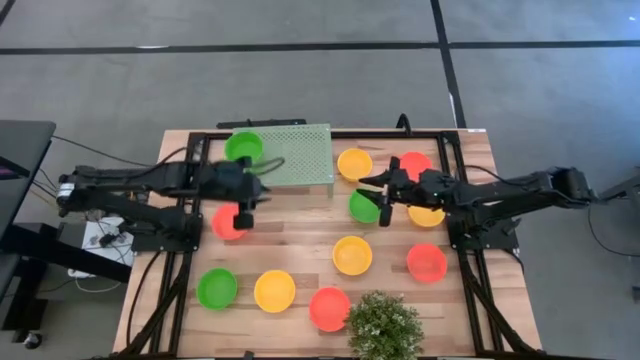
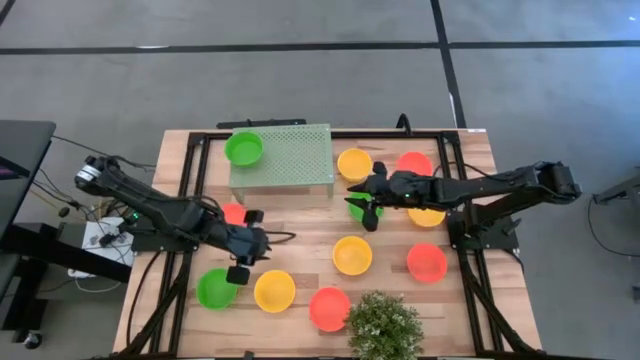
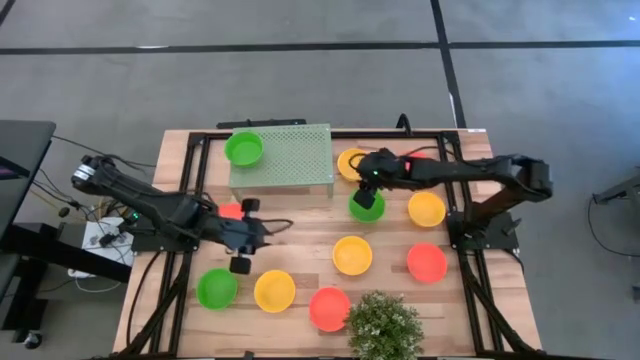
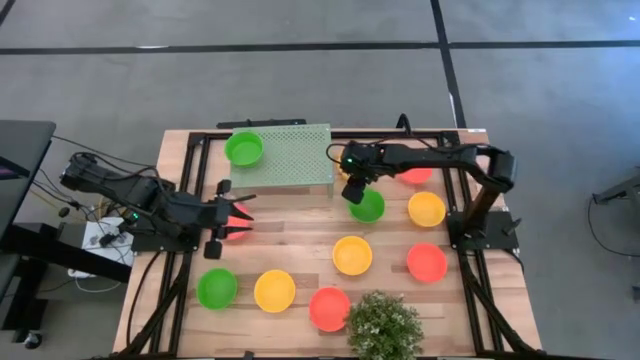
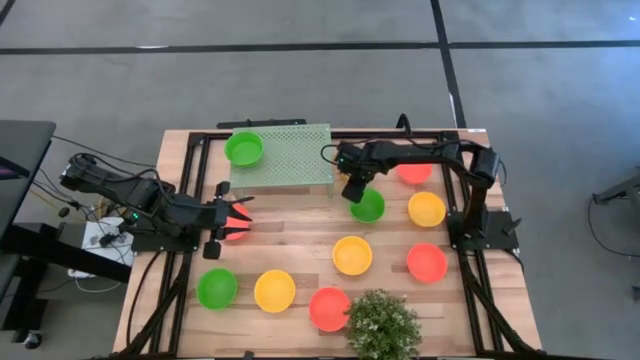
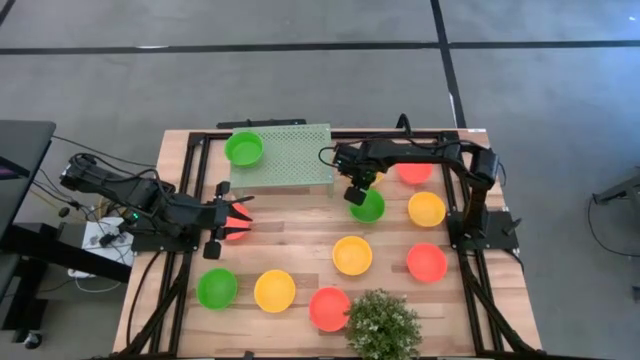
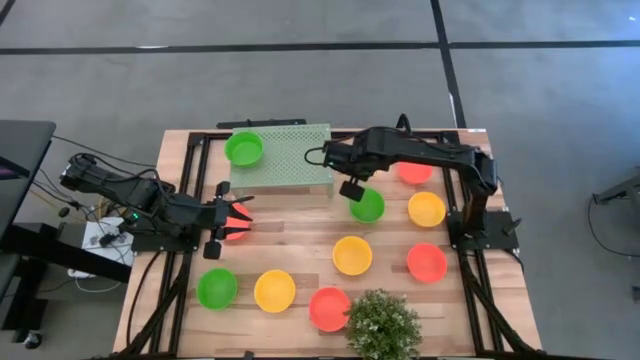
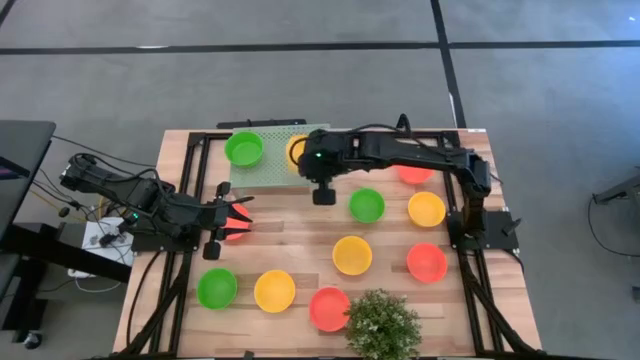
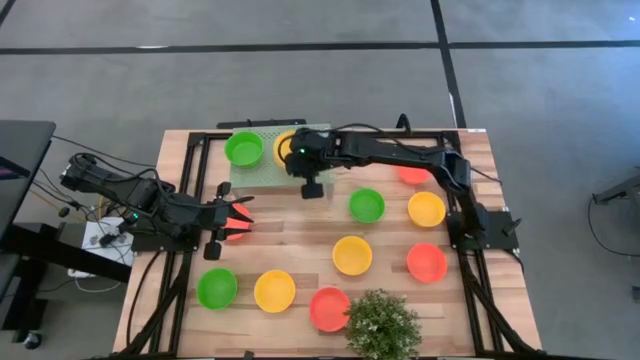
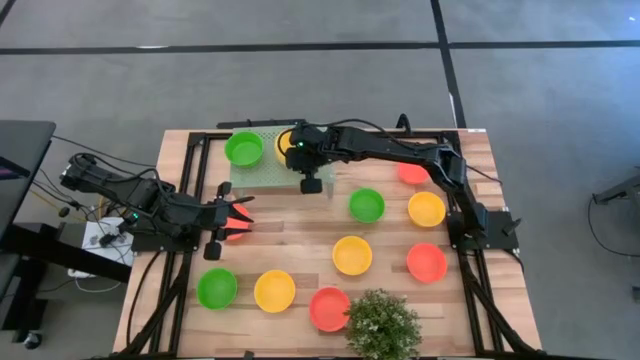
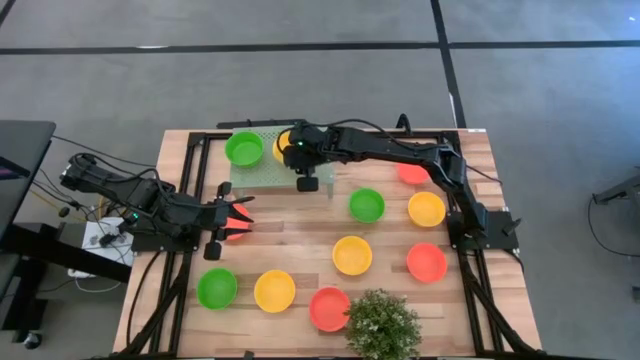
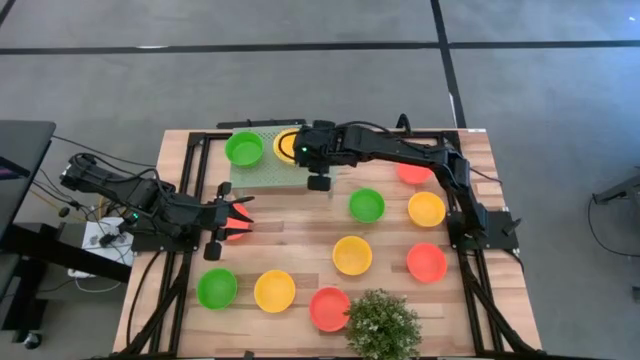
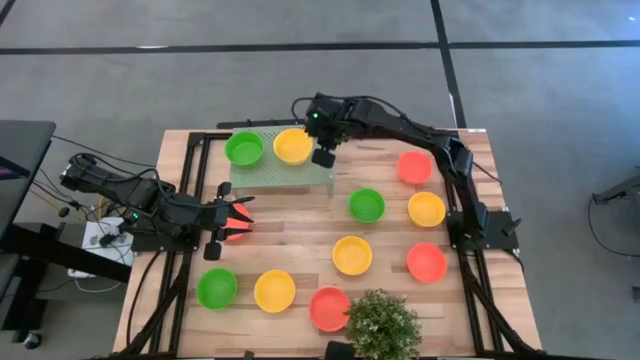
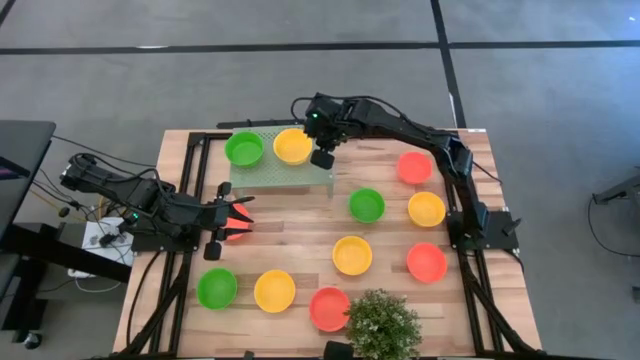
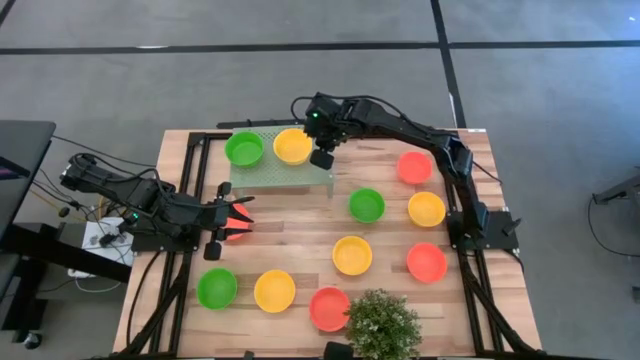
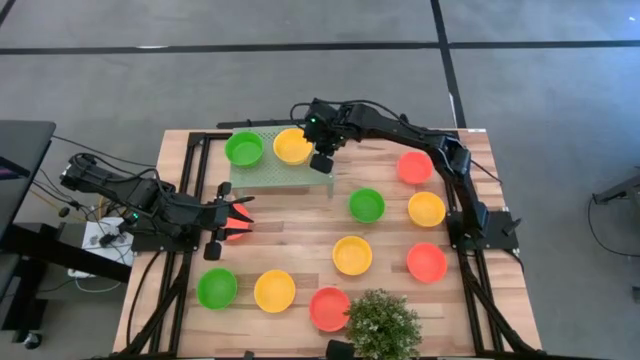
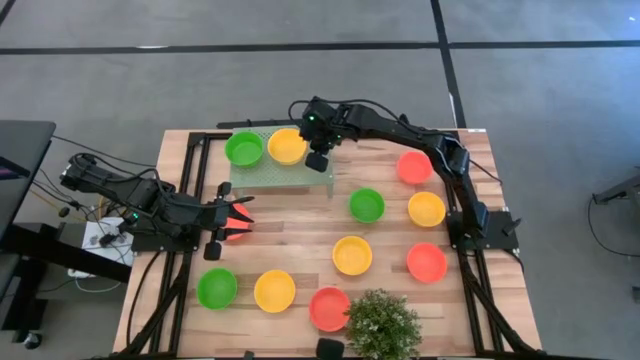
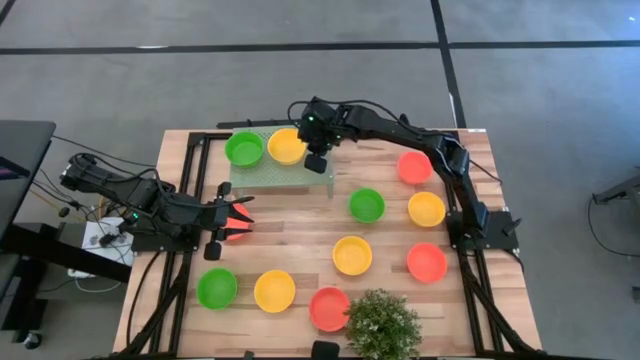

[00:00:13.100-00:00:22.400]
Task: Pick & Place Mini bowls
Put the yellow bowl on the shelf

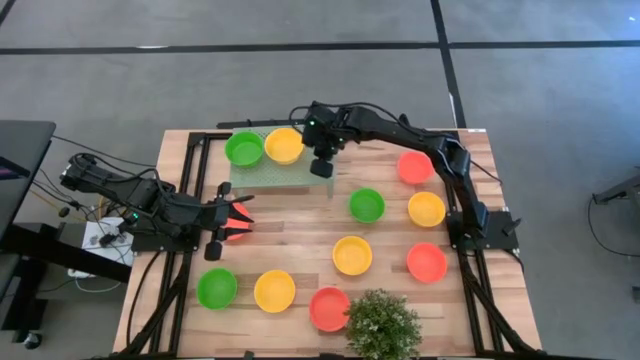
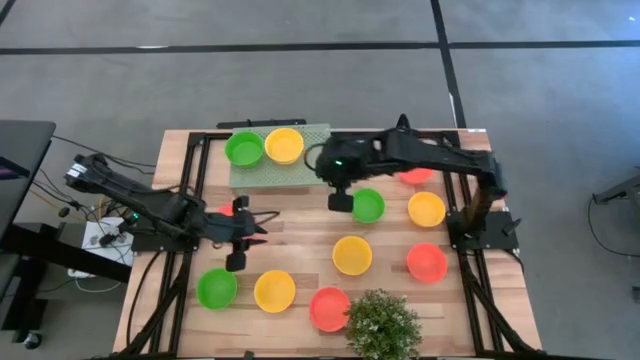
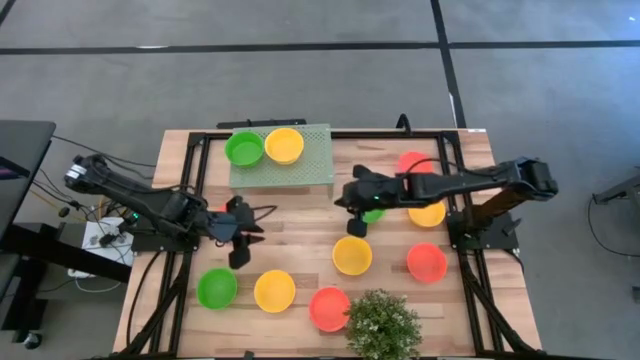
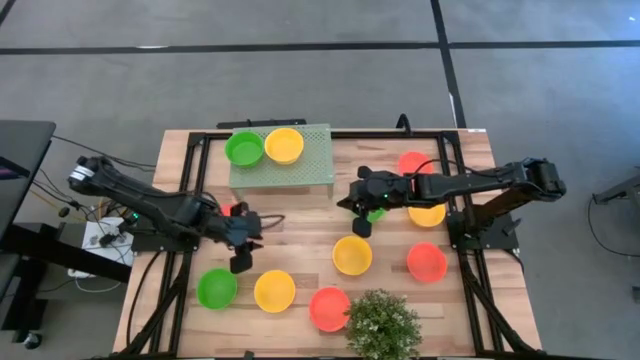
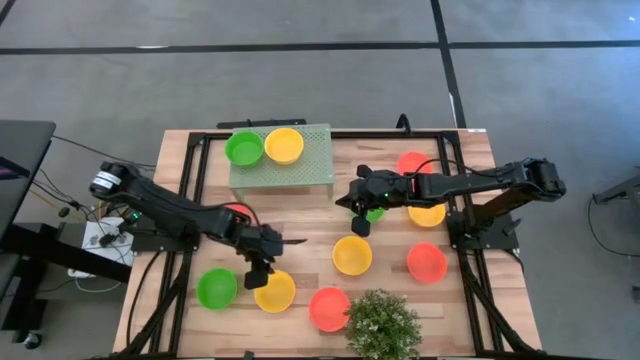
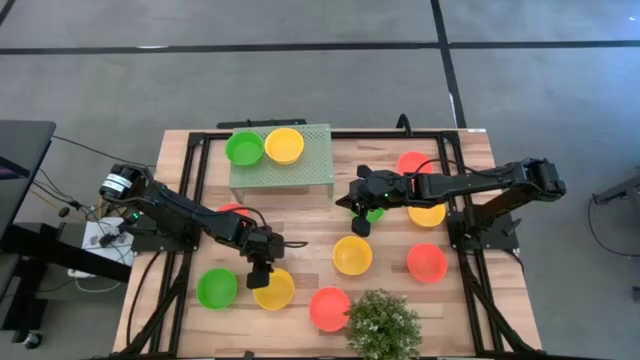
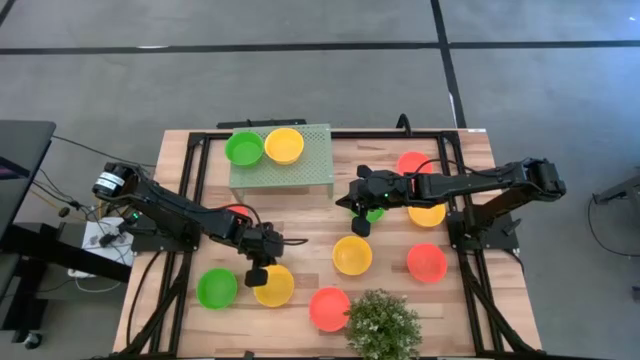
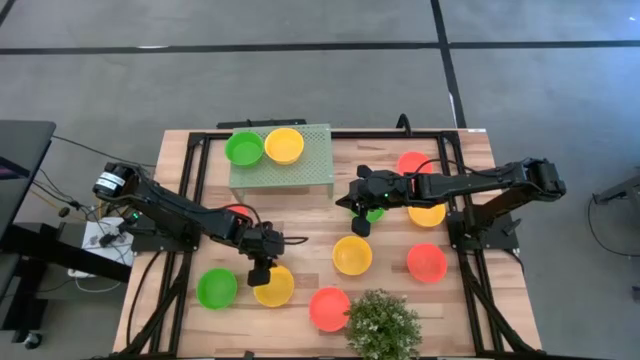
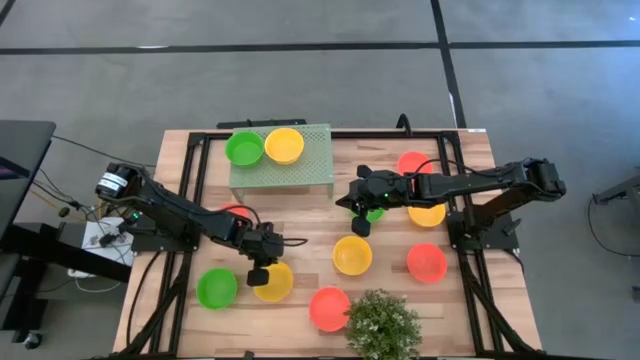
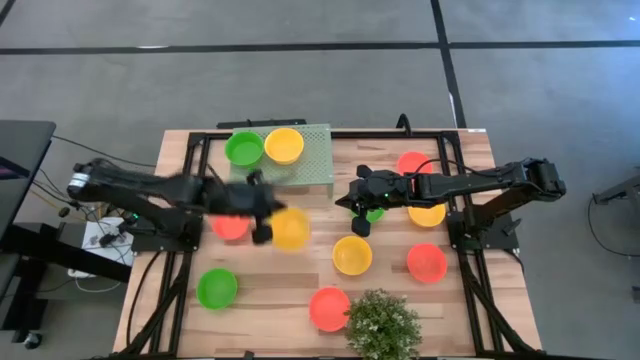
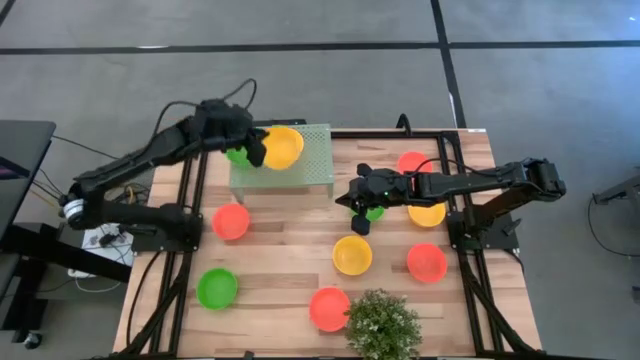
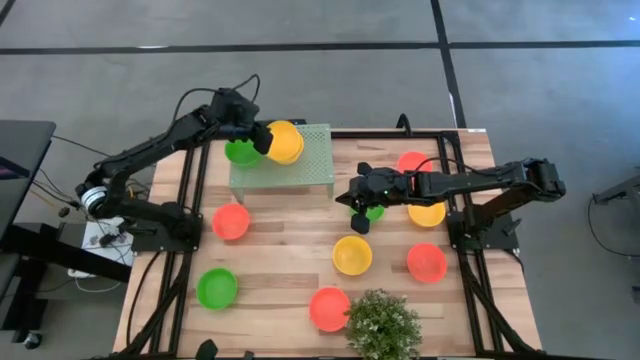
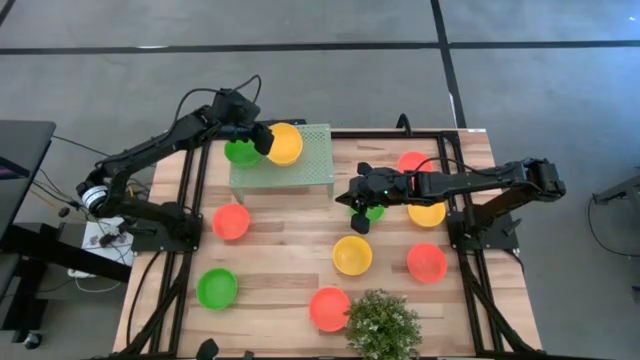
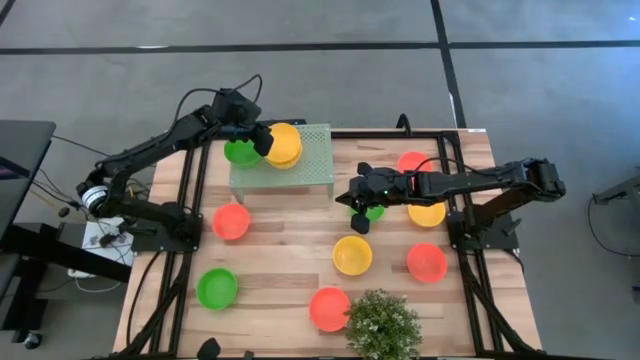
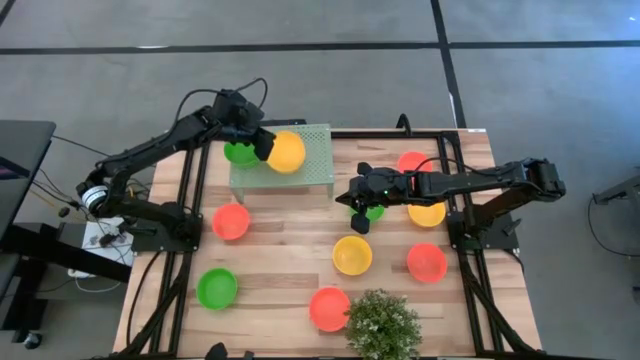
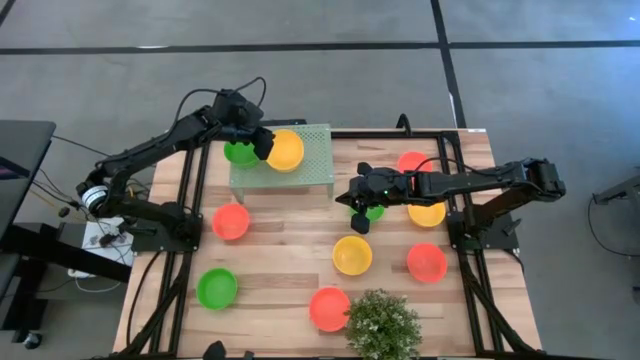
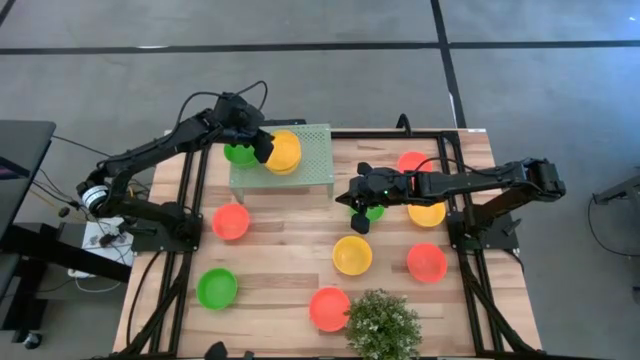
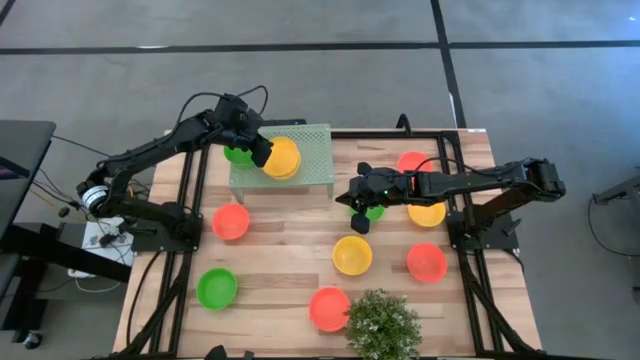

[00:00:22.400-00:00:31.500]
Stack the yellow bowl on top of the yellow bowl on the shelf

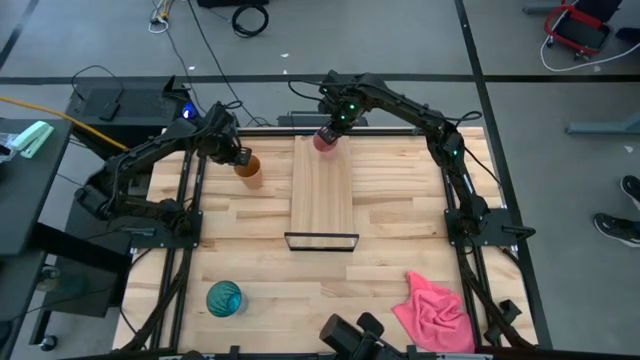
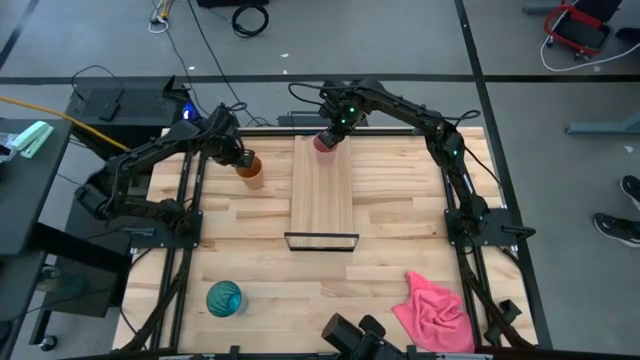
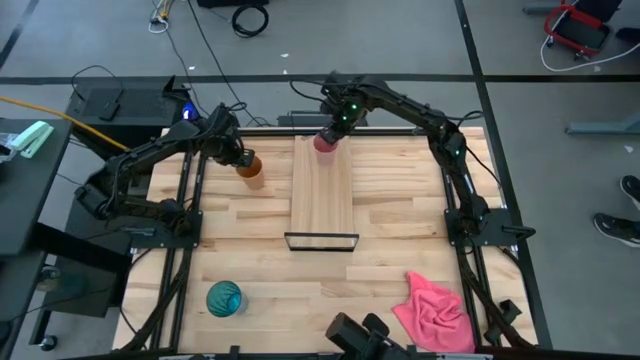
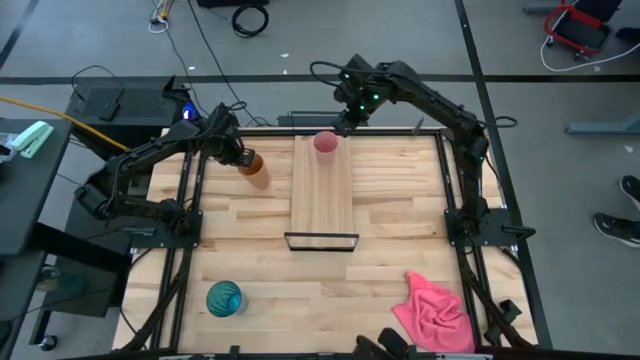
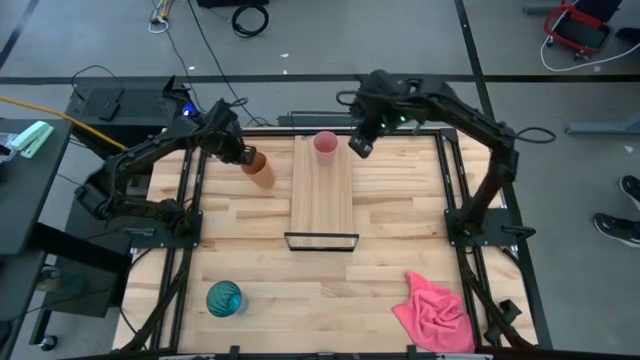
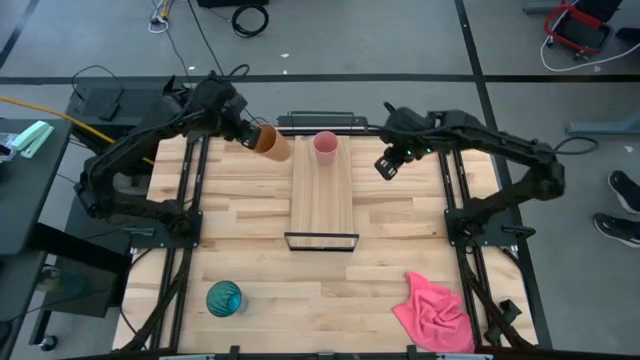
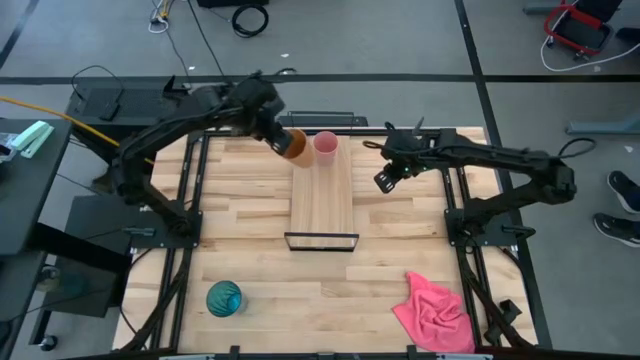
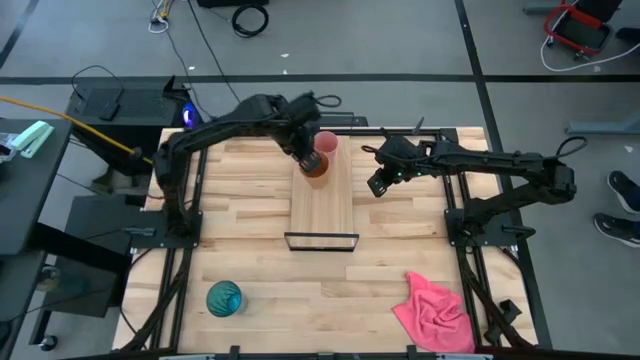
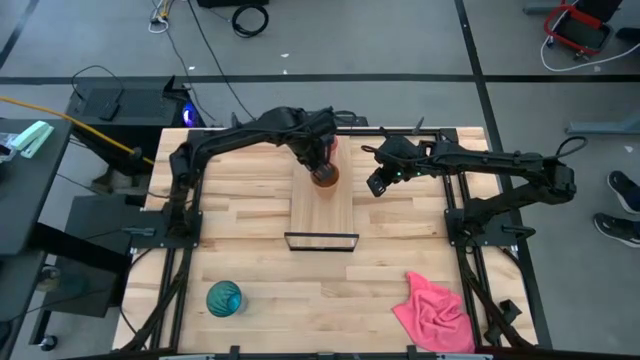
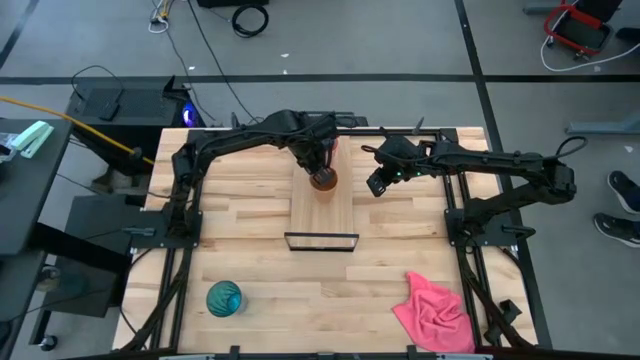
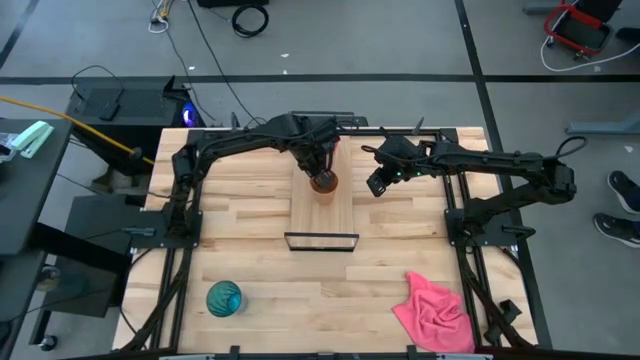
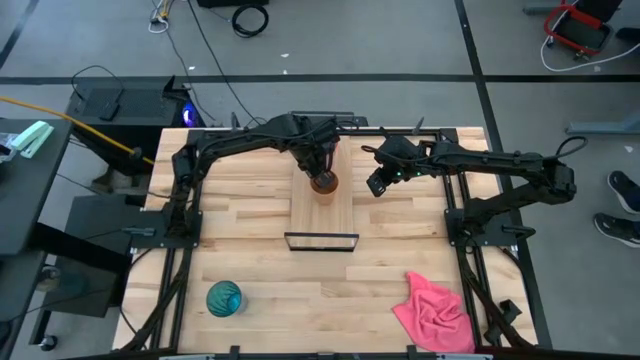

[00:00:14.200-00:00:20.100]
Task: Stack small to large cups/mugs on shelf
Put the orange cup on the shelf
